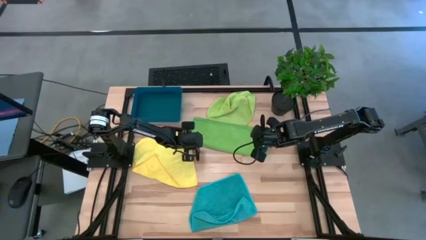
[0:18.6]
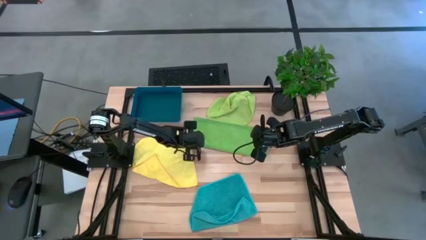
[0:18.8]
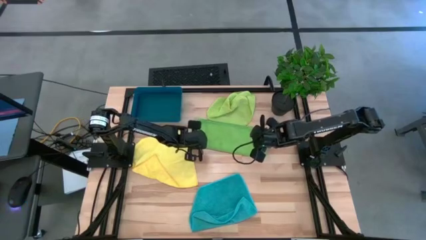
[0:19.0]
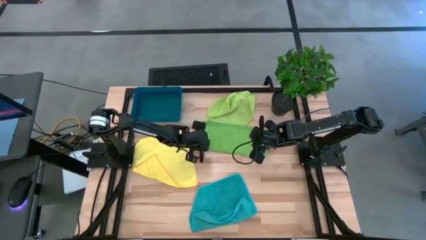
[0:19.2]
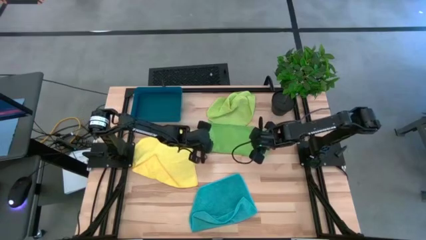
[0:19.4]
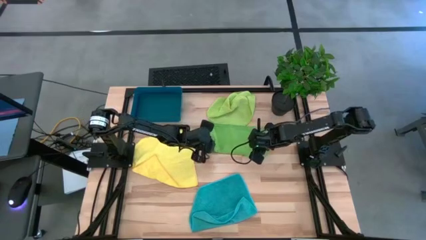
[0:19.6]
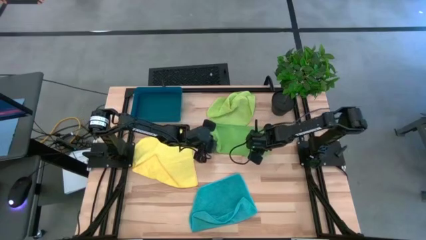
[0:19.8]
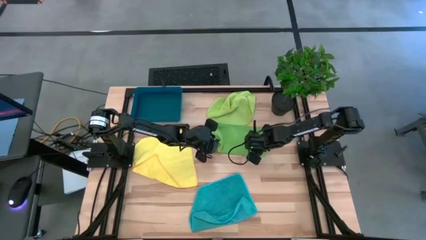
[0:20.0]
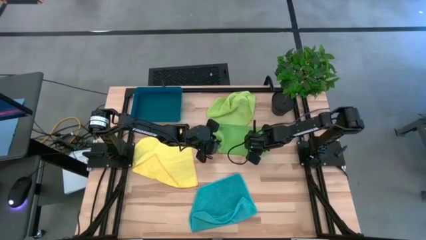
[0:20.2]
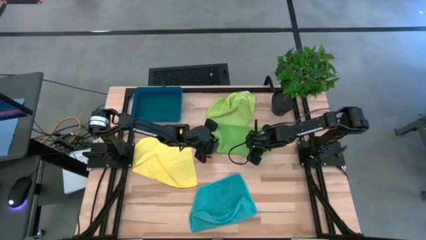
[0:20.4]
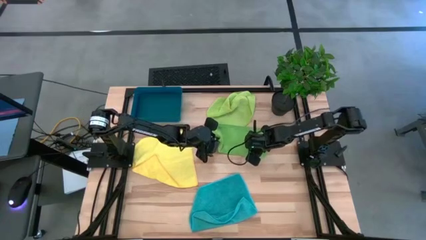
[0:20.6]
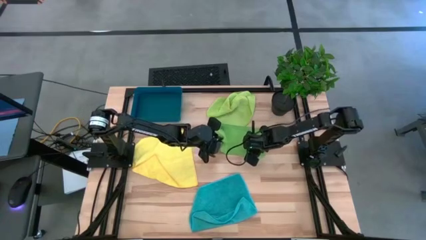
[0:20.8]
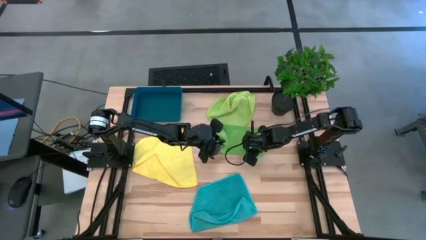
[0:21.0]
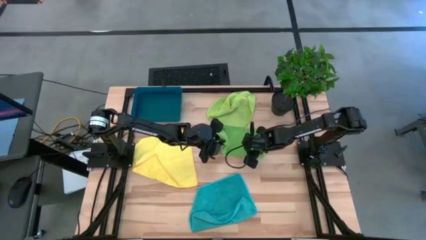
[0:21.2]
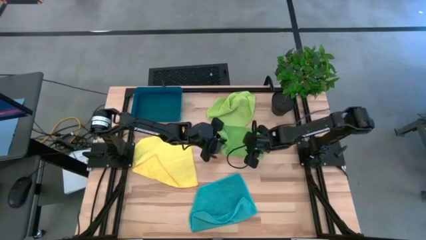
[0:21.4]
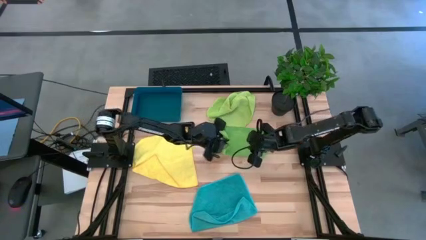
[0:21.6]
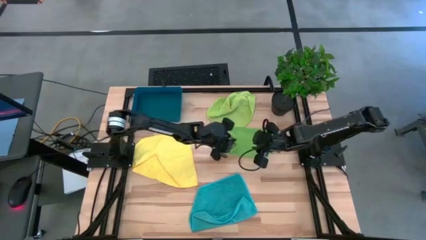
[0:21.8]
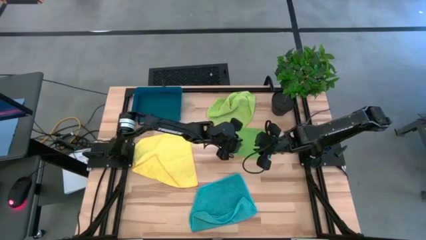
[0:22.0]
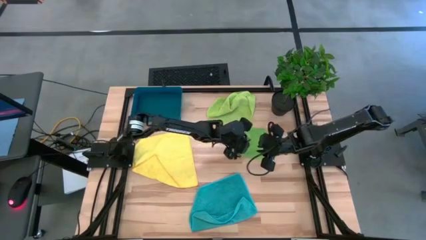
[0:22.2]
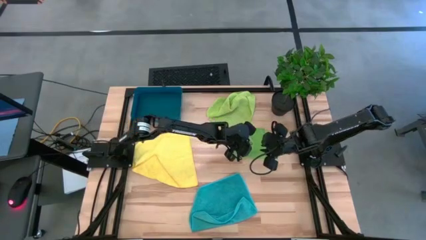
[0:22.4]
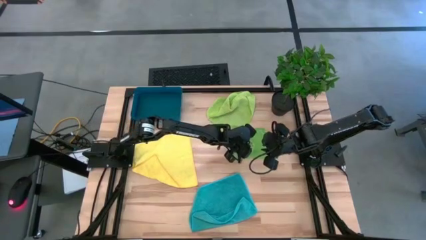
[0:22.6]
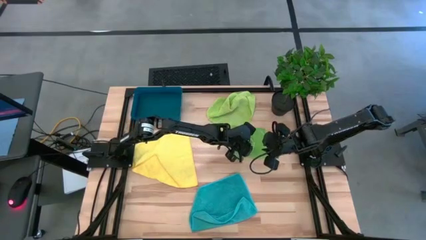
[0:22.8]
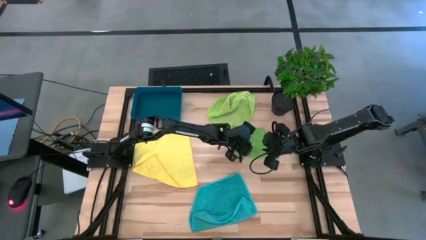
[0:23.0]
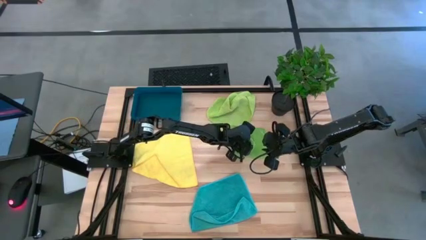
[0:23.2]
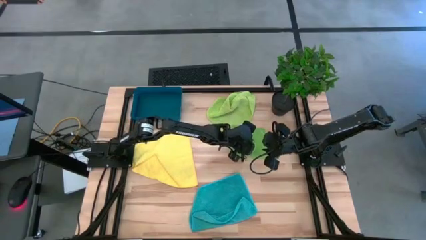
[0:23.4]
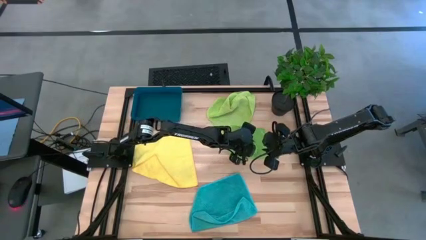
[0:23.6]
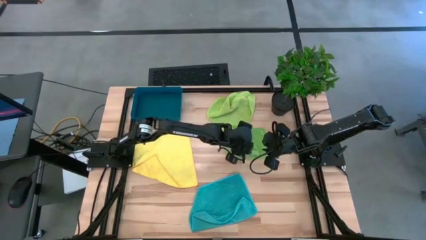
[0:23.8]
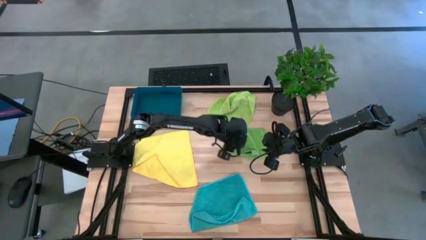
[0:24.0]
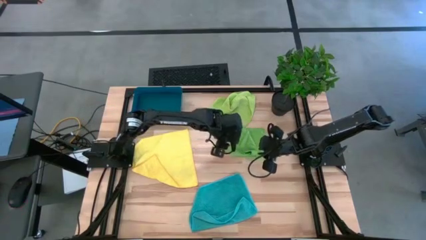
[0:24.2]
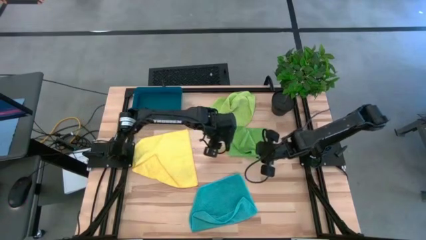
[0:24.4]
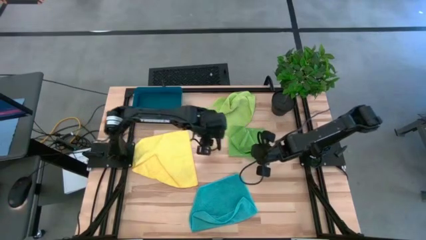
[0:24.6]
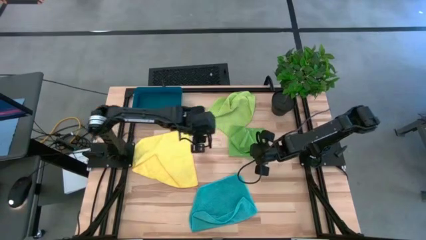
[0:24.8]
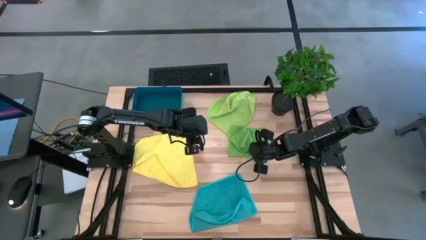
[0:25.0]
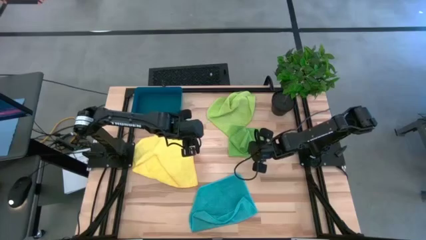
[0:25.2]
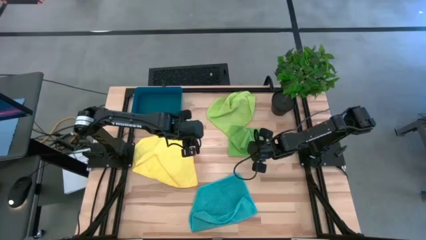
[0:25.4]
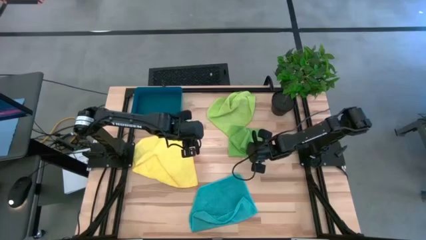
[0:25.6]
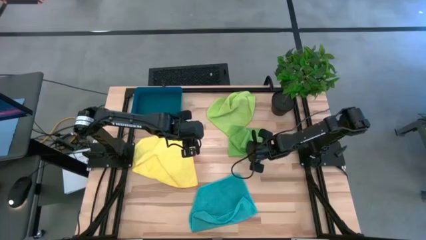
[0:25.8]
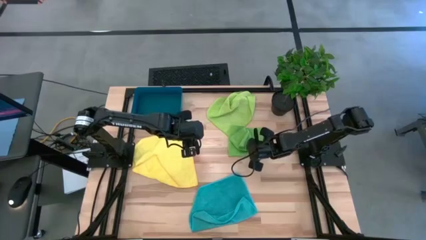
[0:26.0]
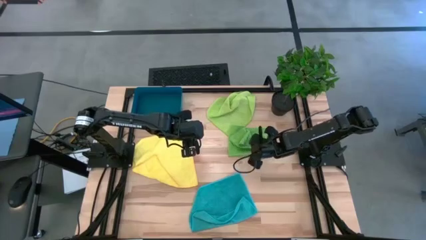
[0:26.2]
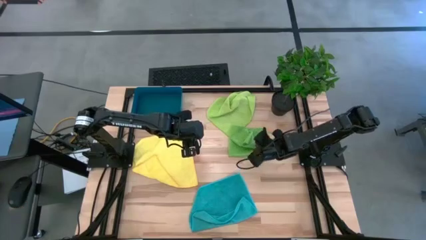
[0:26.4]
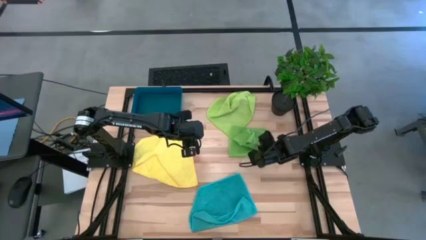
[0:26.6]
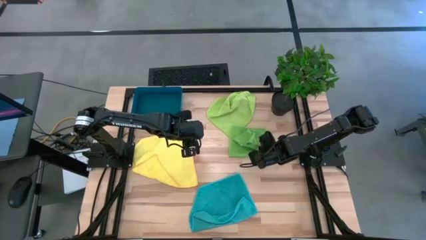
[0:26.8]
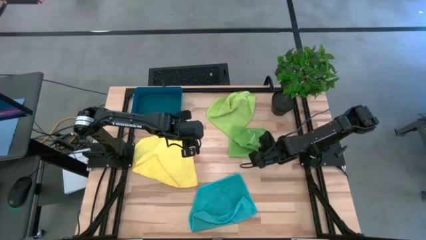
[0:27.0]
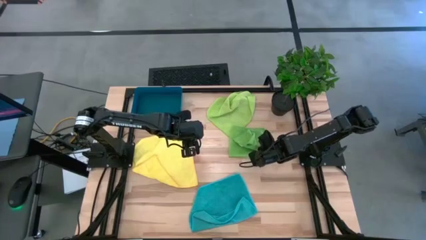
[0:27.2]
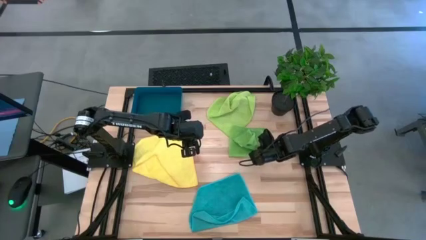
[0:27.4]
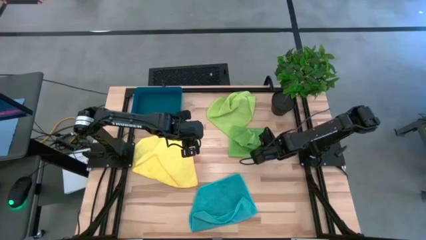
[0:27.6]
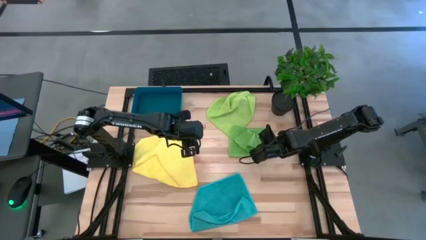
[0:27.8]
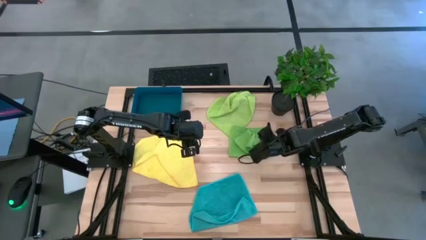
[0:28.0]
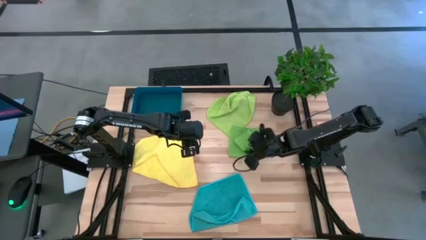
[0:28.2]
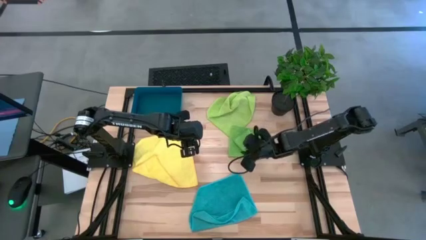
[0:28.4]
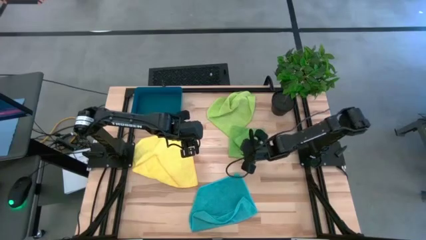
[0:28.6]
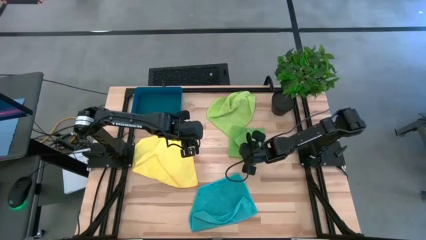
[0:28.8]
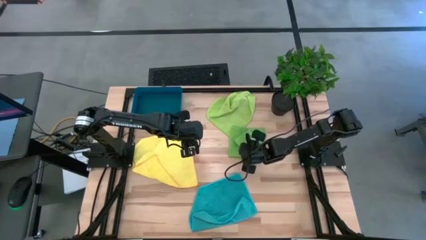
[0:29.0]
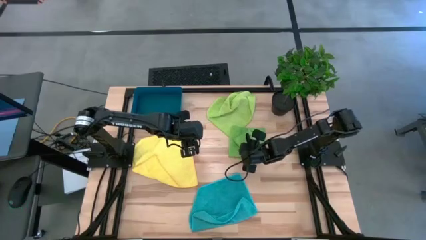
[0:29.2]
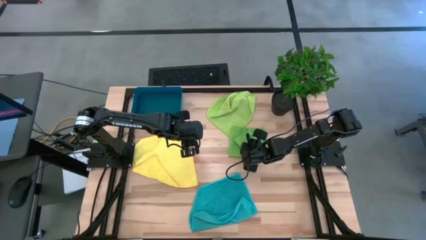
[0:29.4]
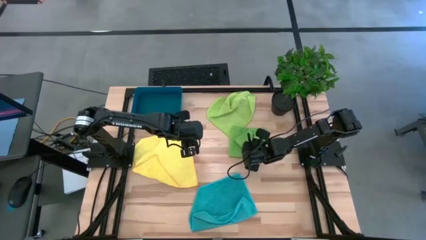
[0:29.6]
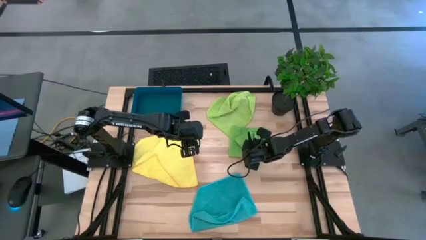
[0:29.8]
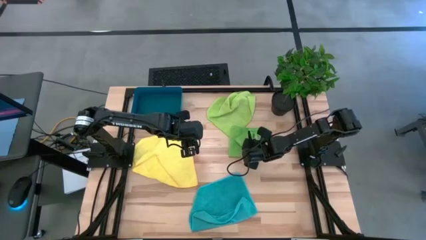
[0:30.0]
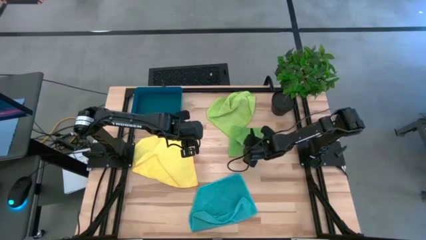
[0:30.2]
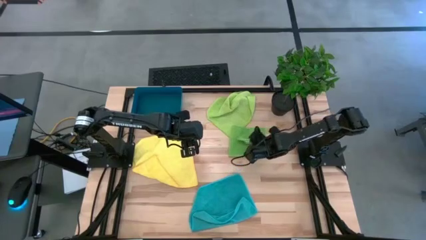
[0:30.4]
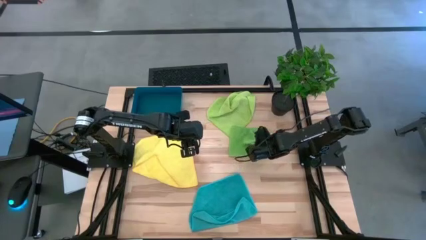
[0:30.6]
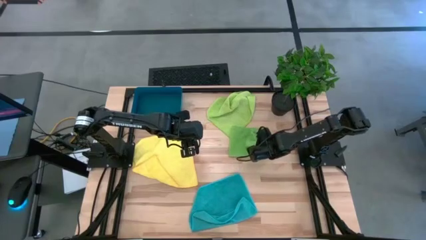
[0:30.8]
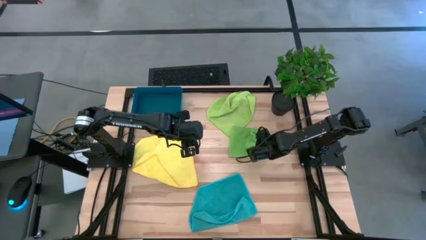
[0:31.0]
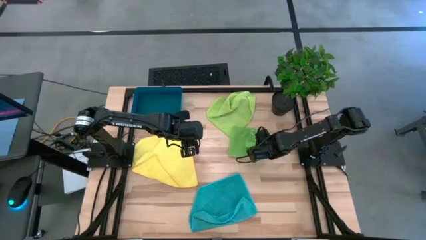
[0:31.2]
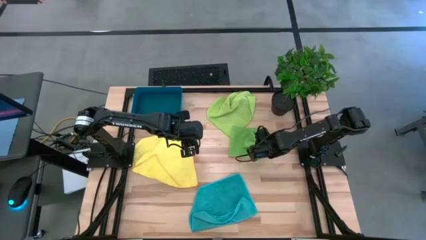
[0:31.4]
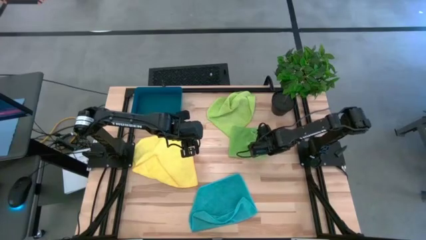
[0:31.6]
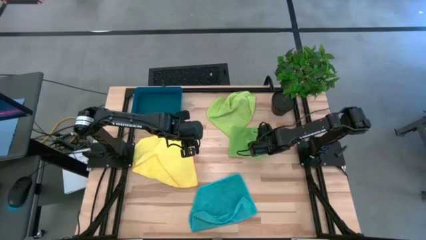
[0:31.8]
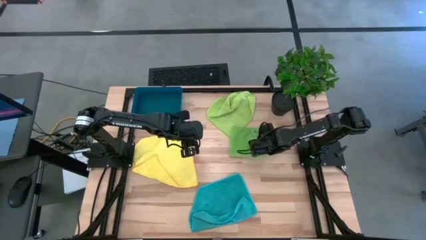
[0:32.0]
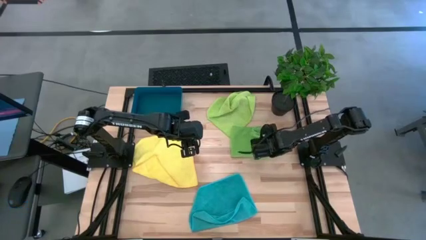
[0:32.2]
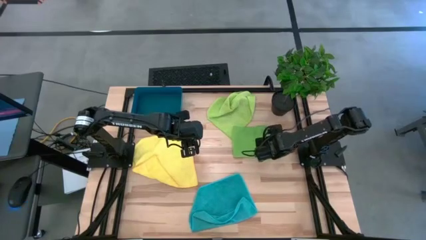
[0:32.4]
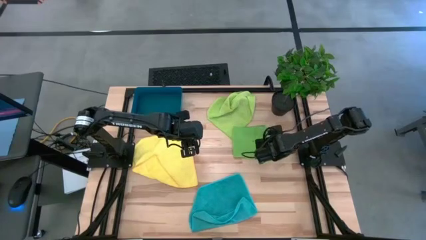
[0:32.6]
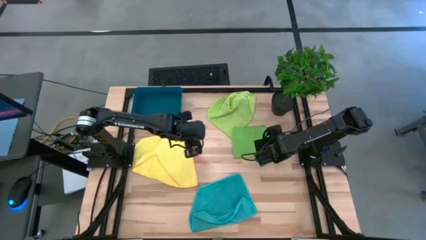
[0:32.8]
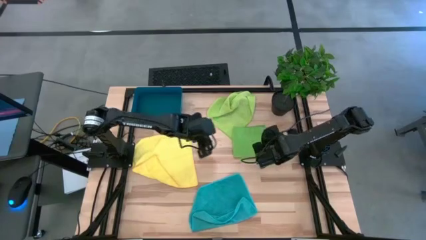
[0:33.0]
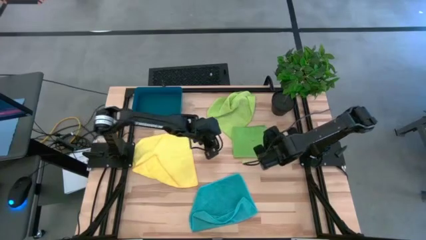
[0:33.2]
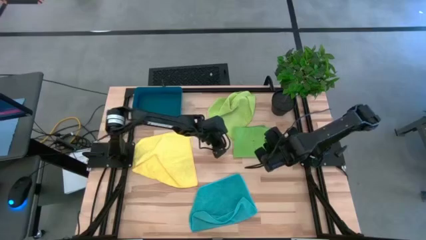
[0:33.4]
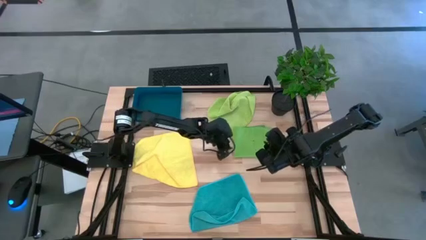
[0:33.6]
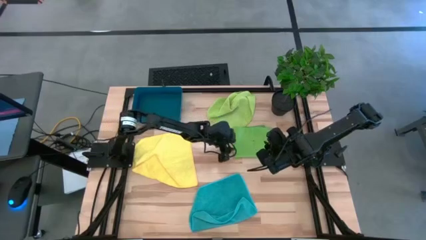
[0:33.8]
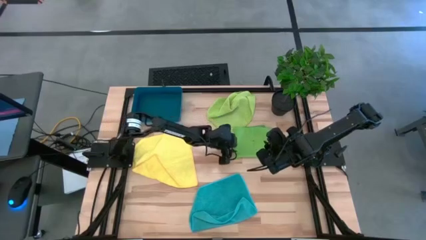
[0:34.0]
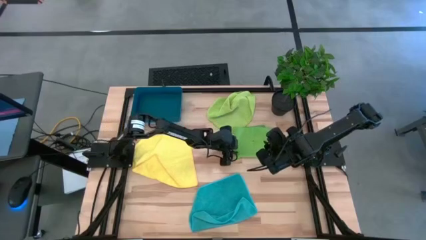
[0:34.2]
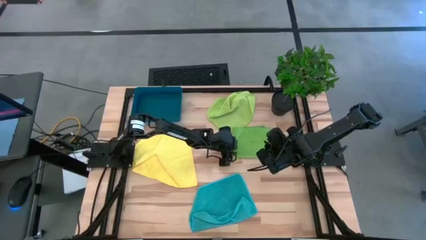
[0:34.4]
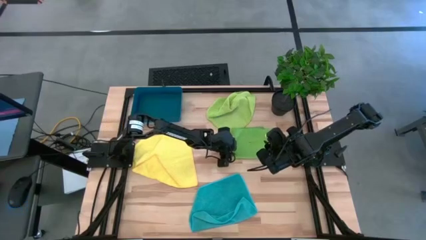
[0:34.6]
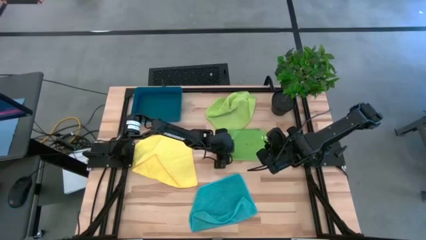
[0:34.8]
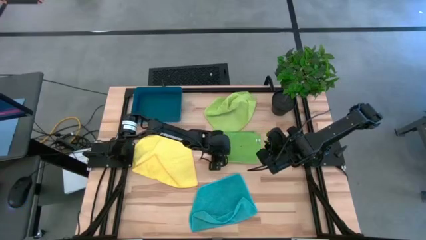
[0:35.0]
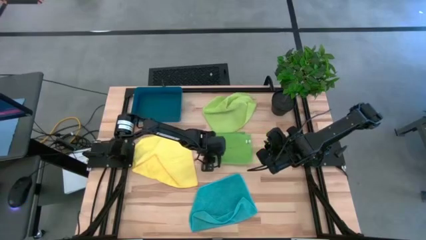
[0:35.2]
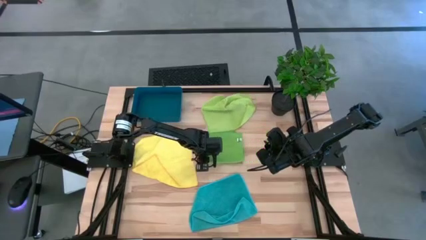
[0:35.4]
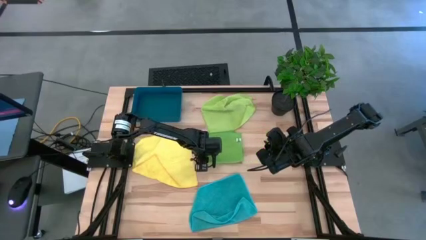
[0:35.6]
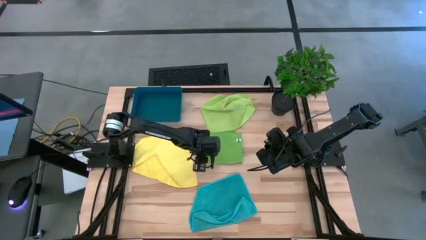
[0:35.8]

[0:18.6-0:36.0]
Task: Fold microfiber towels
Fold the green towel
